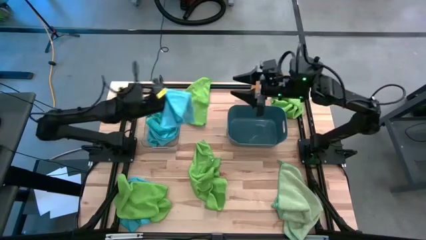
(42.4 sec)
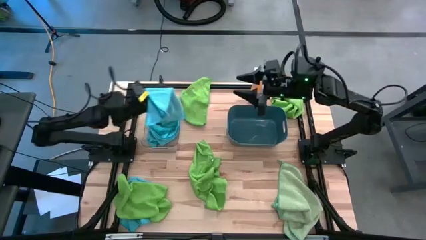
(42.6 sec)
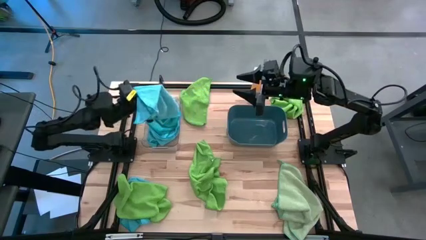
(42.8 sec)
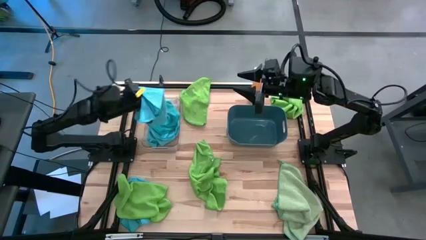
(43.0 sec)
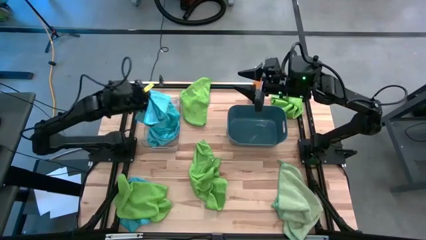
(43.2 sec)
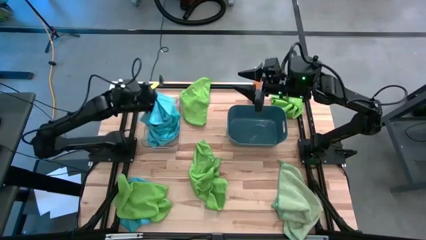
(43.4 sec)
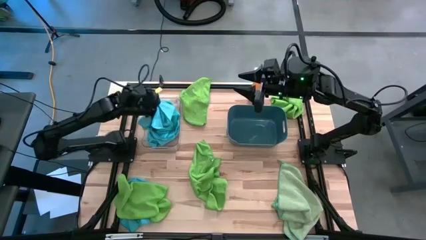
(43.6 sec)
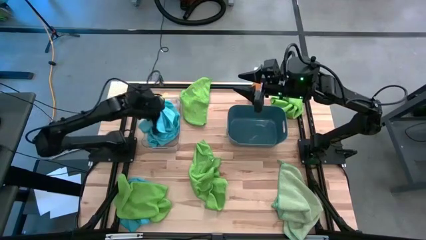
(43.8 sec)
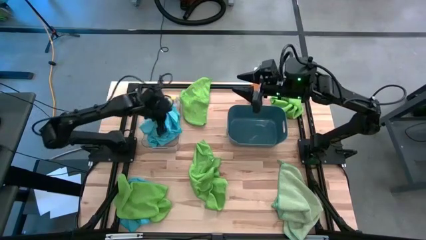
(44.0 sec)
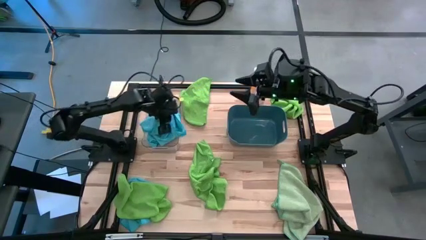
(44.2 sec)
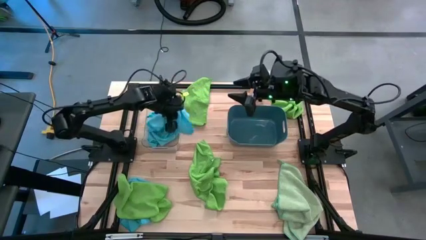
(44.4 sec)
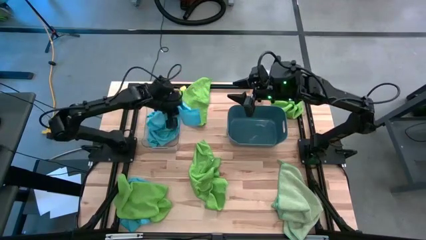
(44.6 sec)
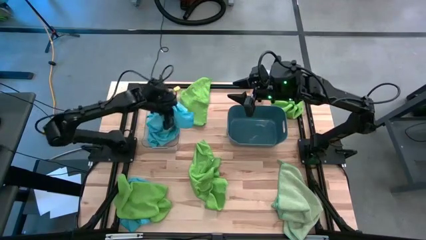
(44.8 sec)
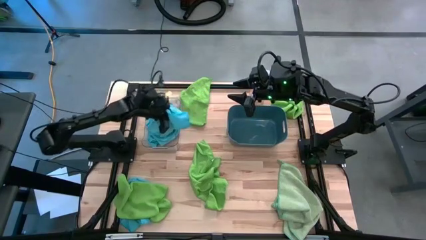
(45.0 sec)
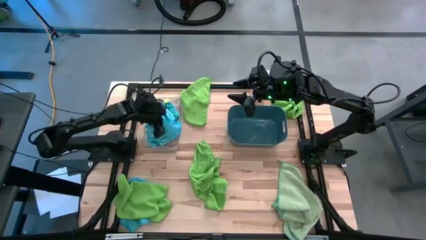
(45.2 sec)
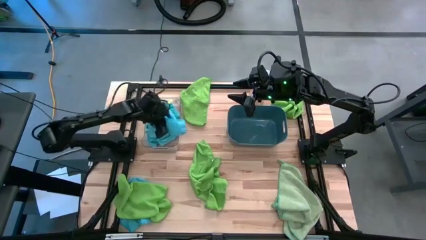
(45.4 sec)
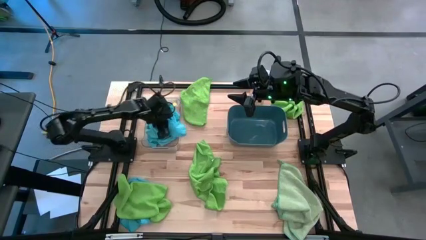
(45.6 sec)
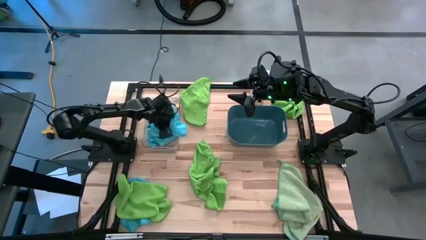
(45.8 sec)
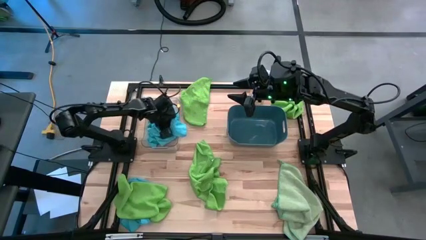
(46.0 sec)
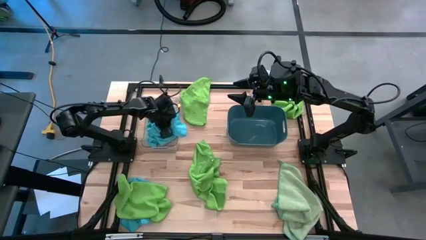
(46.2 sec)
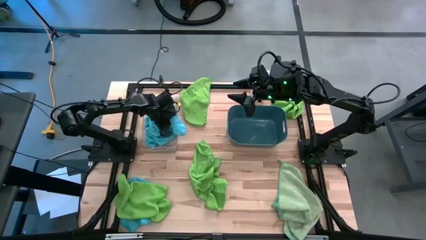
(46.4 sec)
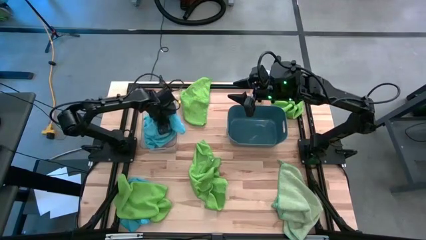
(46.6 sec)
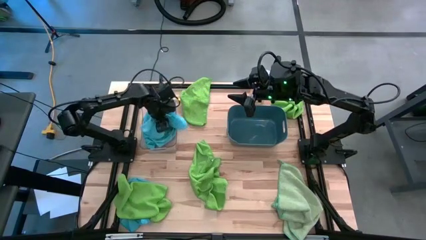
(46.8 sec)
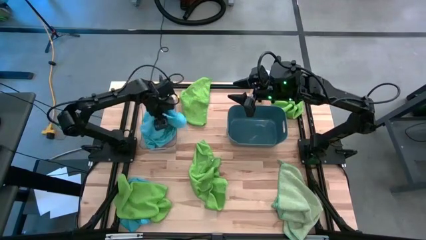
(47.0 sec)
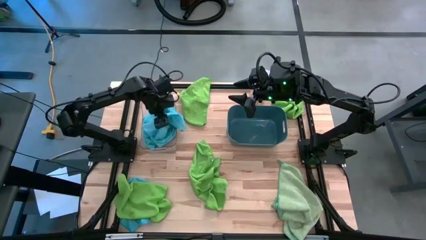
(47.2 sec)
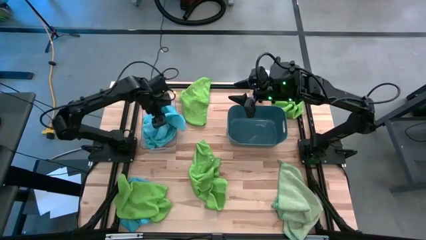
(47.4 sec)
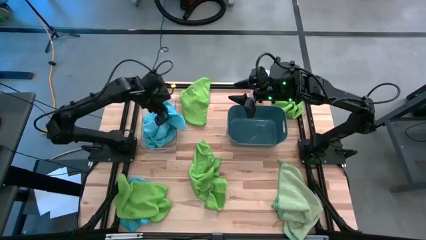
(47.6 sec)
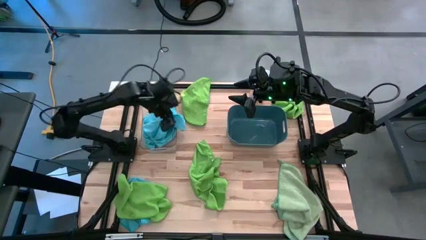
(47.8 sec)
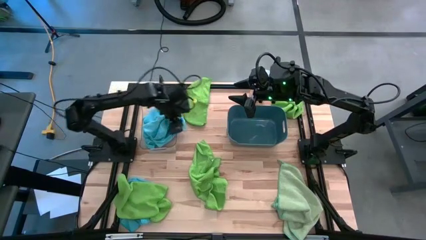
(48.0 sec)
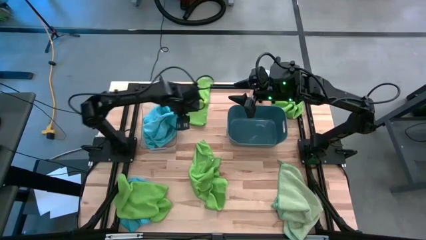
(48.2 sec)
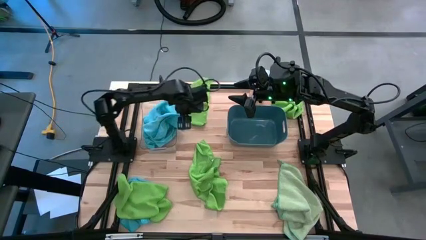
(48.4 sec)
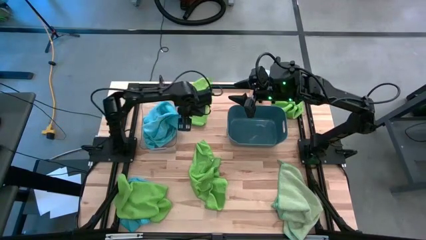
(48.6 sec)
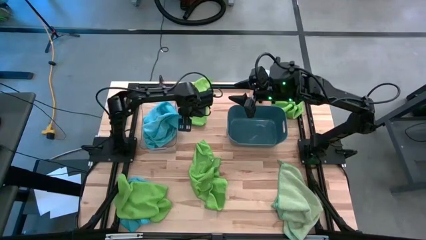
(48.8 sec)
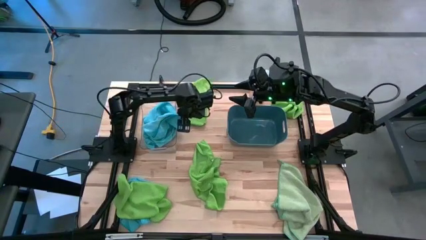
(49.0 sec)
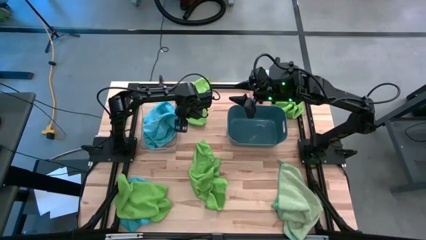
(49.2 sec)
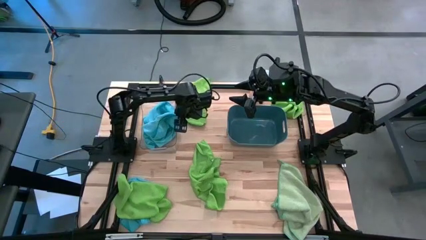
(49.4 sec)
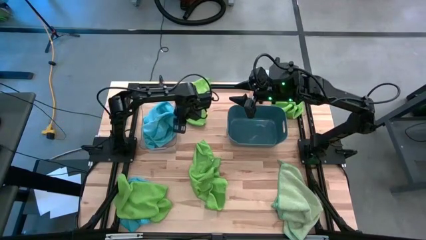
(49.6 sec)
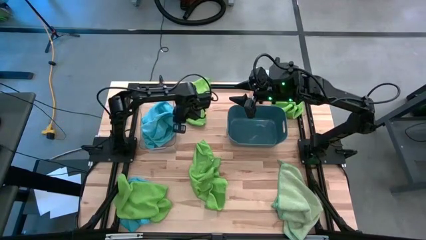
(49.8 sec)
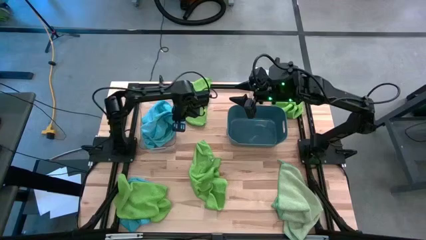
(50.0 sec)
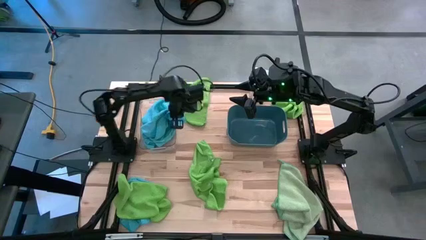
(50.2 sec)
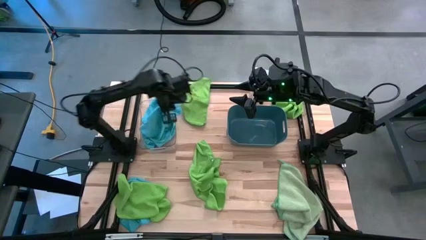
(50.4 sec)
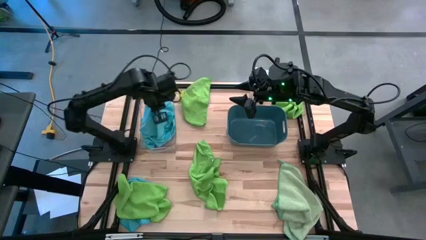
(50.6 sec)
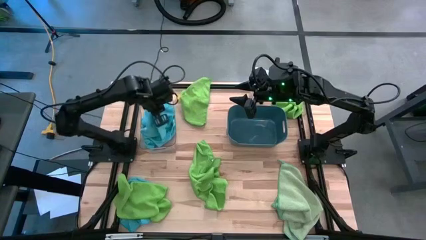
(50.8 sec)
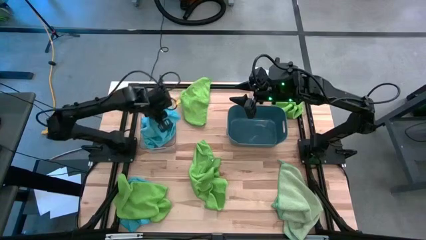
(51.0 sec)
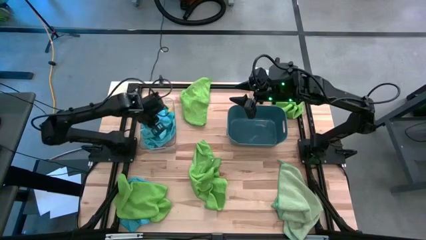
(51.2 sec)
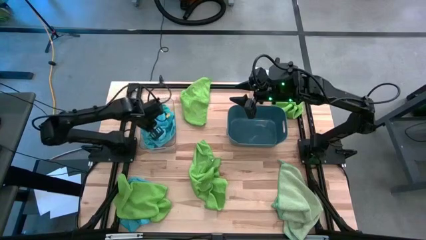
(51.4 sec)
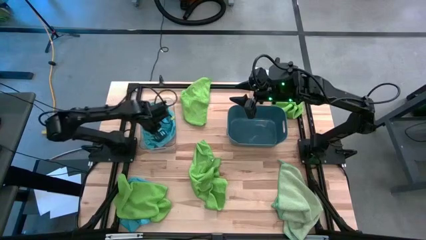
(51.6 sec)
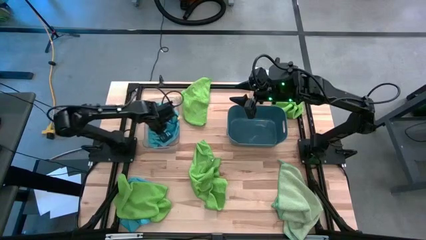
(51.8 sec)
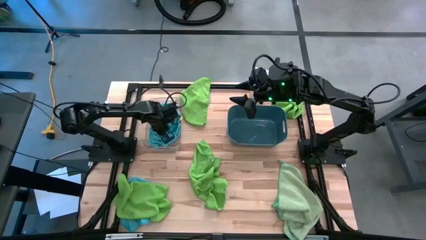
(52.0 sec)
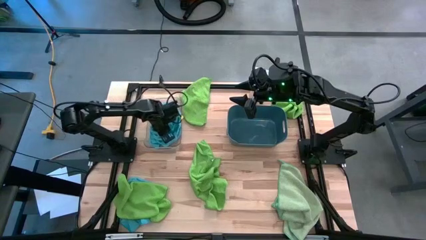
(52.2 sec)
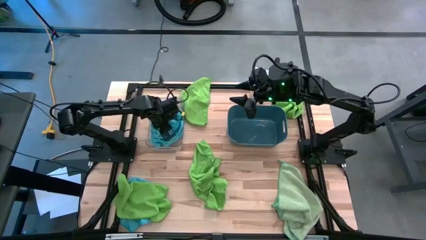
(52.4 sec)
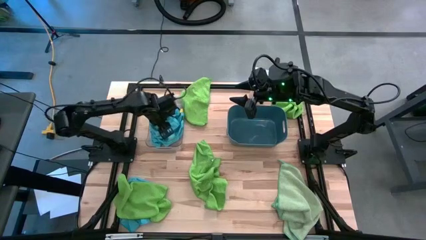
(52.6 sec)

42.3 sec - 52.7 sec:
Task: Sort microfiber towel by color & place in baskets
Put the blue microfiber towel into the transparent bin

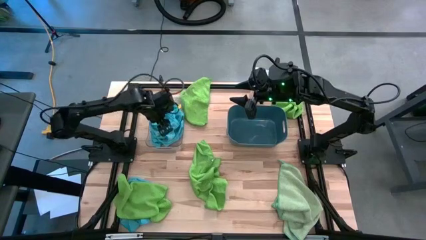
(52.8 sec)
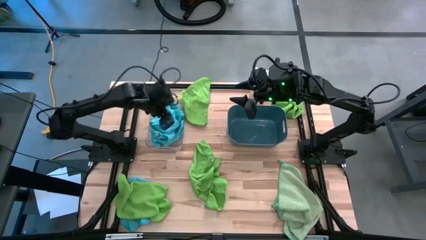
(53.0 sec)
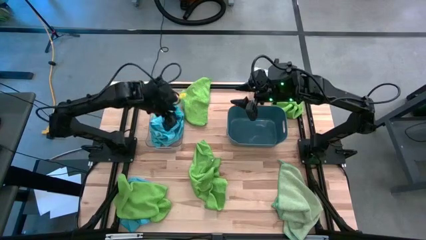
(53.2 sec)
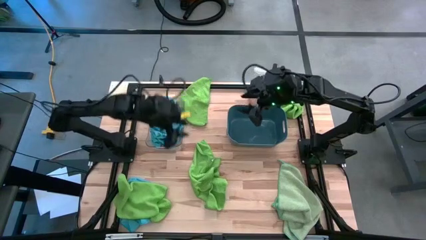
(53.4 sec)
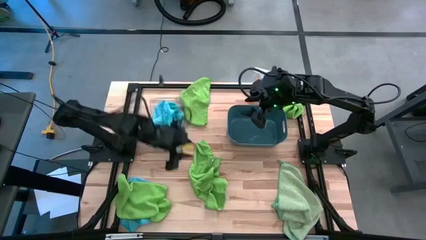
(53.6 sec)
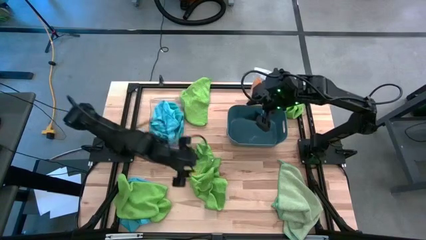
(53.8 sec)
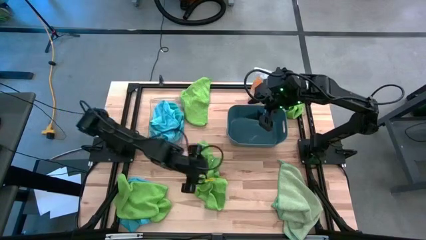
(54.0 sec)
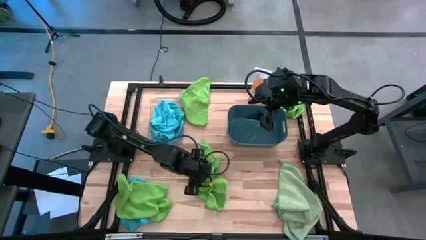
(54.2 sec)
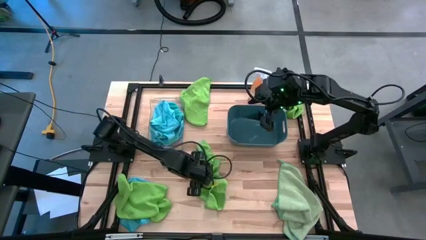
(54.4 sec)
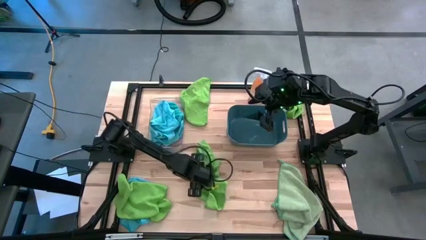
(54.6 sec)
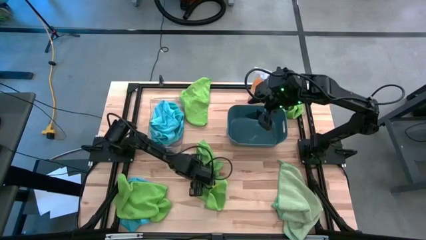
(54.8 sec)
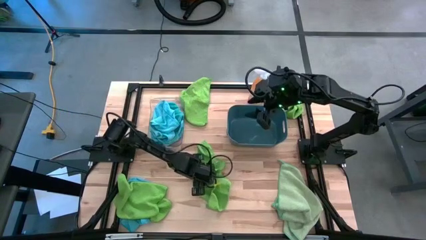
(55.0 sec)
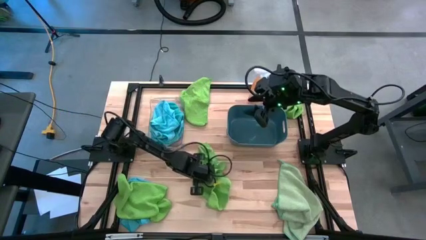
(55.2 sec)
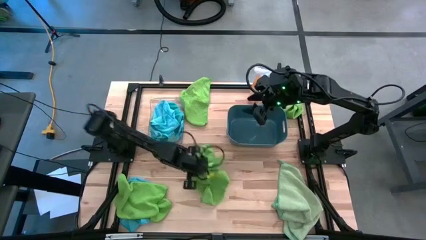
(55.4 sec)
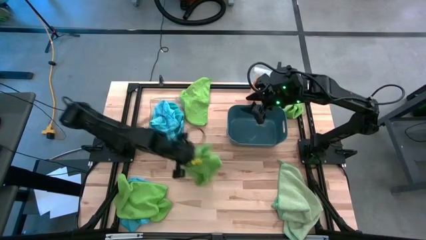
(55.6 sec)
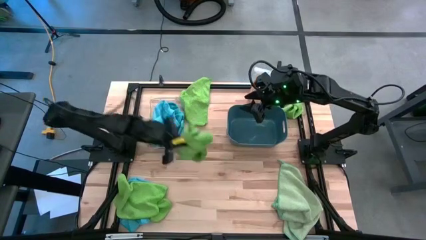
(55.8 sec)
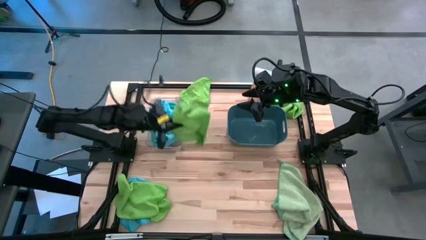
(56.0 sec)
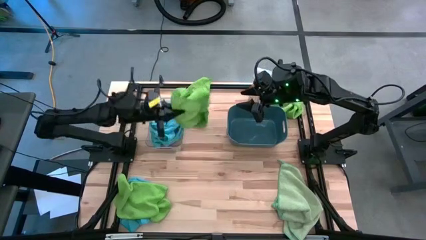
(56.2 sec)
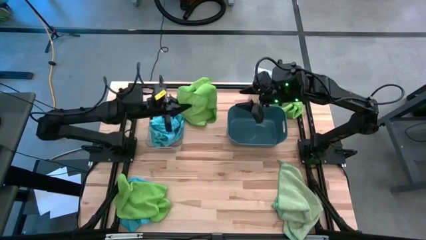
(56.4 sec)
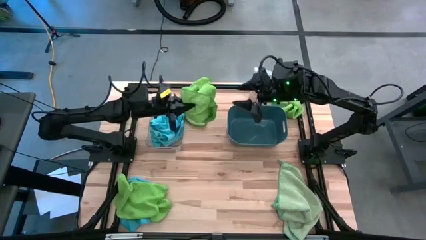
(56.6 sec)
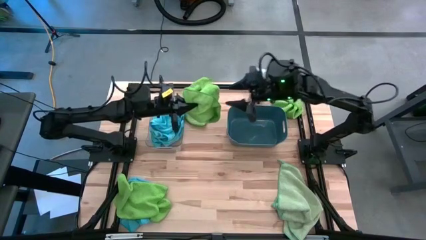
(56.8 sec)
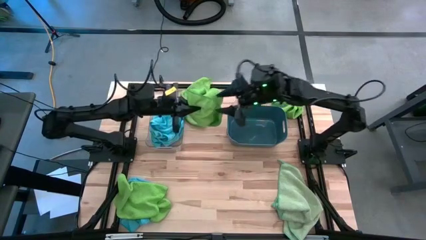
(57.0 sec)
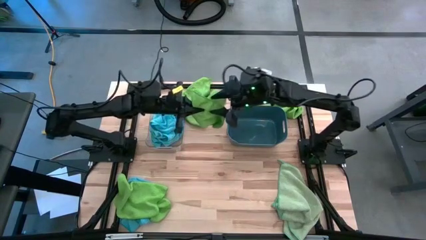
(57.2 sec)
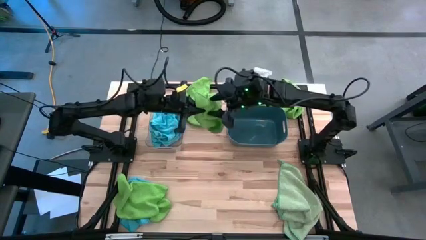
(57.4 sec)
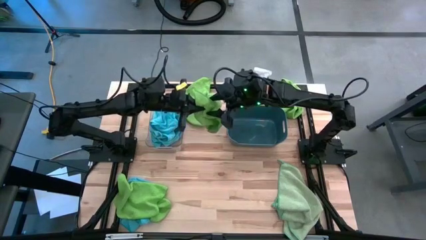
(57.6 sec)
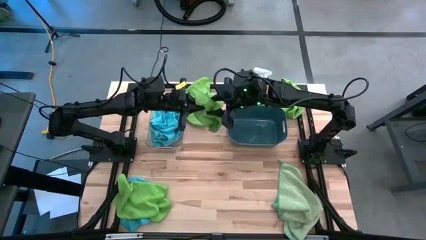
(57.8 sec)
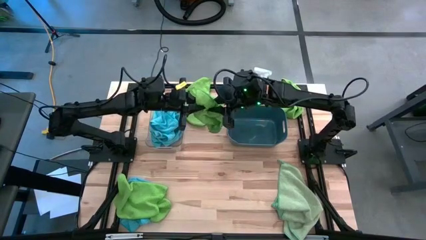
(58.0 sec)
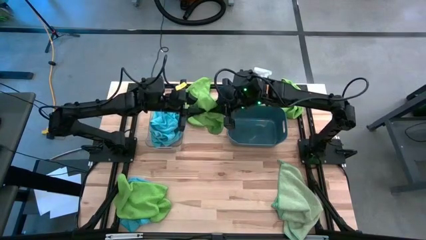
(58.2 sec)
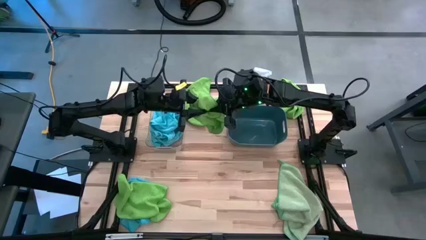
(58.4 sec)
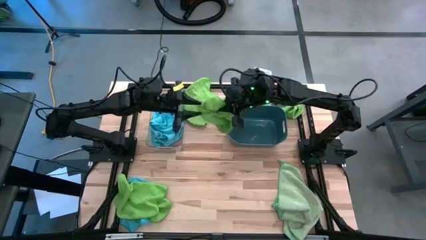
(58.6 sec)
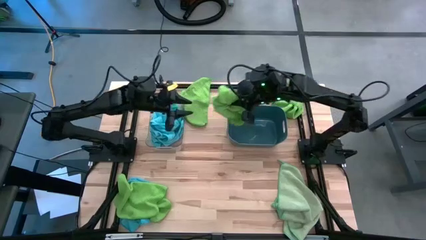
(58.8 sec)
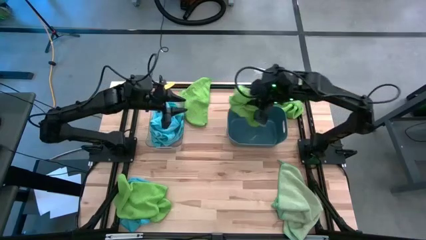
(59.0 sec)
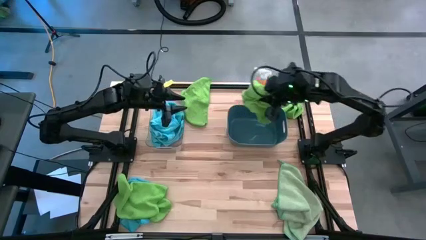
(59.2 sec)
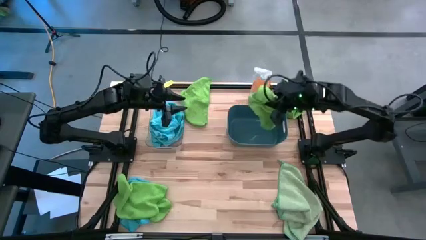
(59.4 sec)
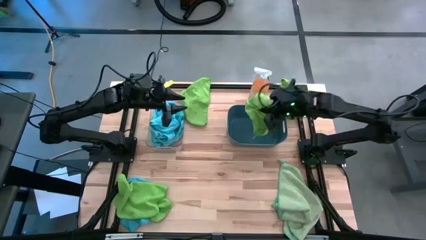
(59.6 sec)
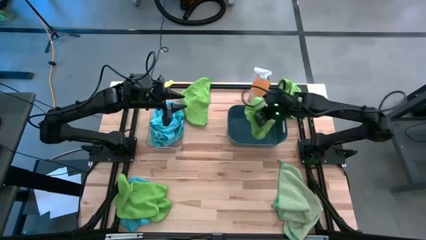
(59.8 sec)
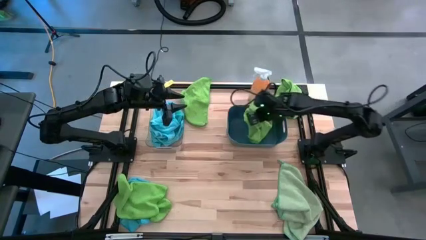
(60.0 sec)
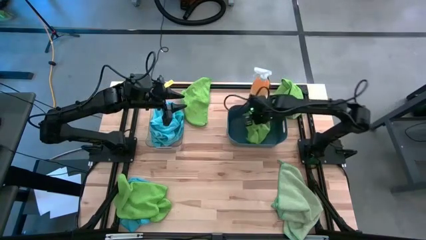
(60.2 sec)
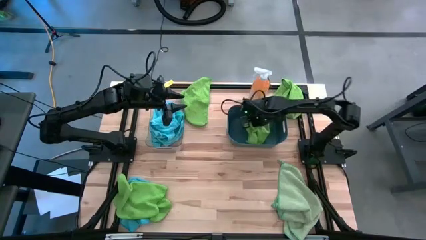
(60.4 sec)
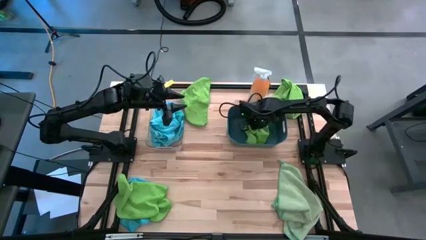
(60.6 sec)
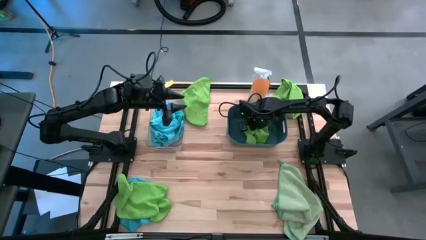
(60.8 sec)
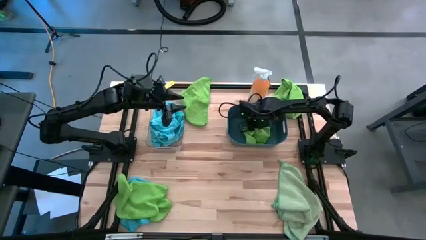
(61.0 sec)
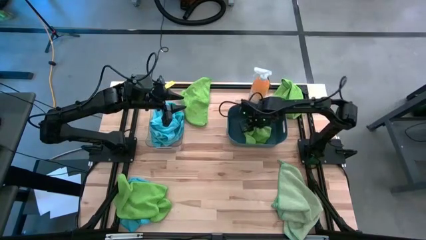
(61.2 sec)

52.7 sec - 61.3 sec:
Put the green microfiber towel into the blue bin
